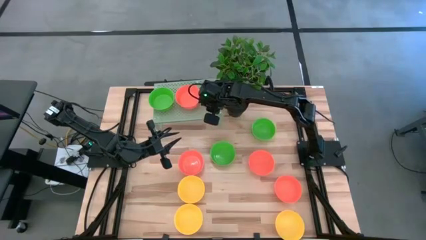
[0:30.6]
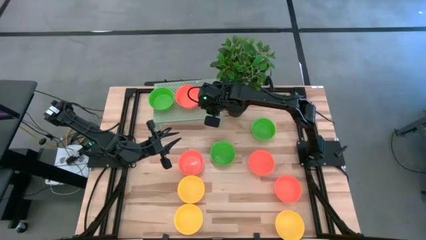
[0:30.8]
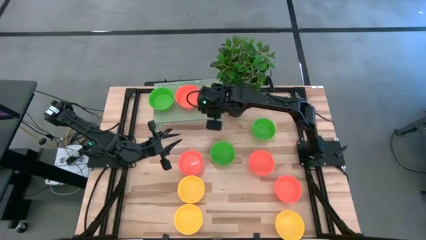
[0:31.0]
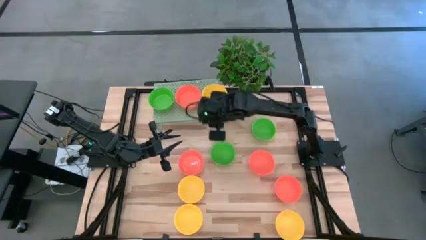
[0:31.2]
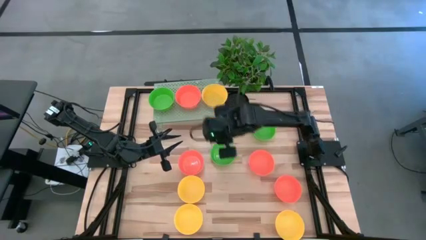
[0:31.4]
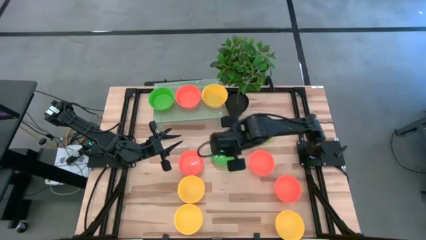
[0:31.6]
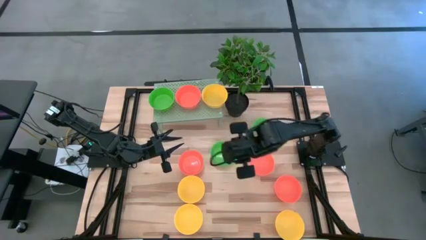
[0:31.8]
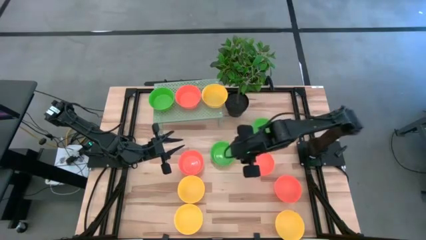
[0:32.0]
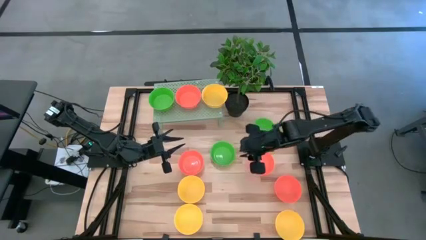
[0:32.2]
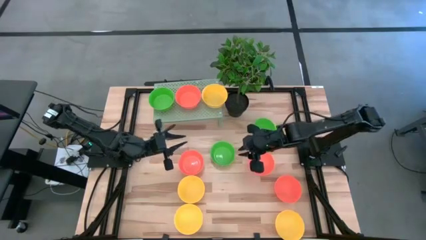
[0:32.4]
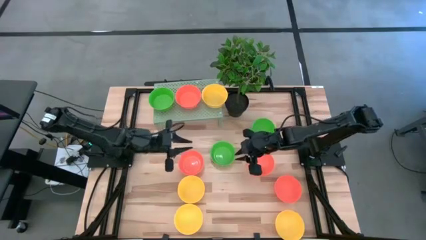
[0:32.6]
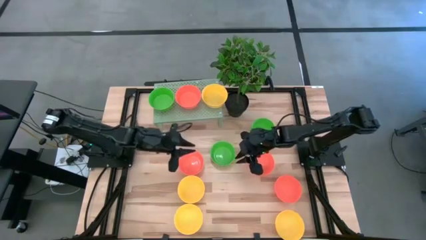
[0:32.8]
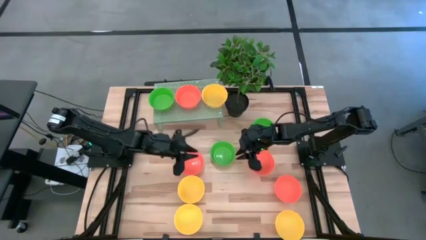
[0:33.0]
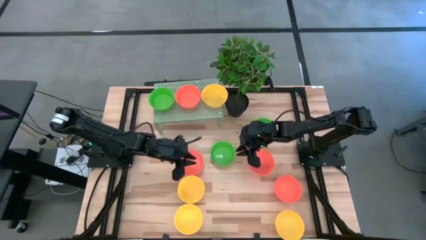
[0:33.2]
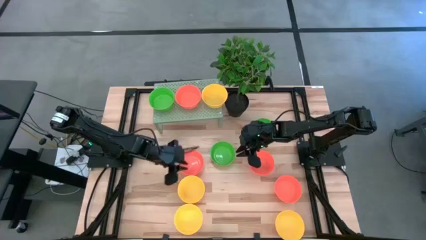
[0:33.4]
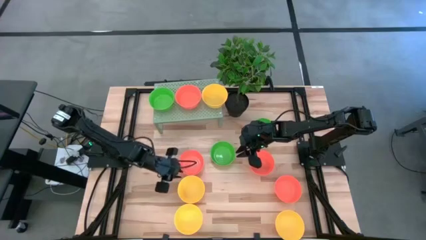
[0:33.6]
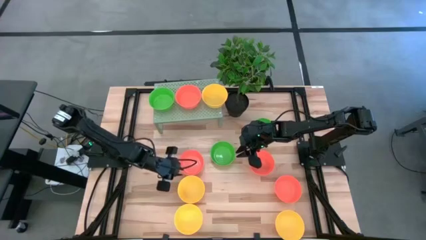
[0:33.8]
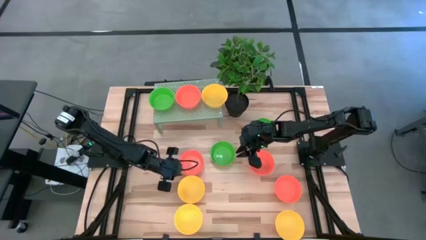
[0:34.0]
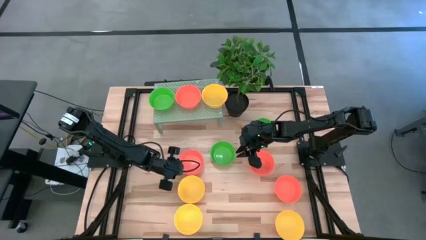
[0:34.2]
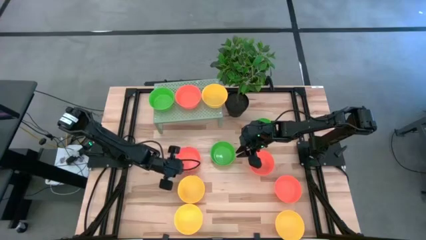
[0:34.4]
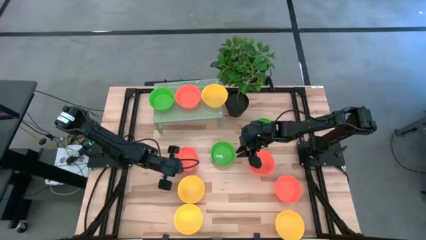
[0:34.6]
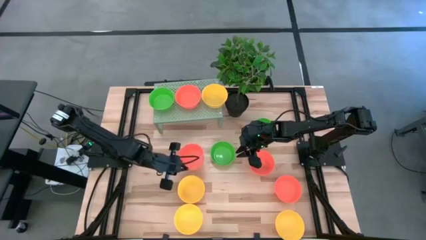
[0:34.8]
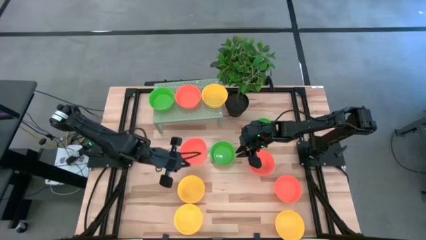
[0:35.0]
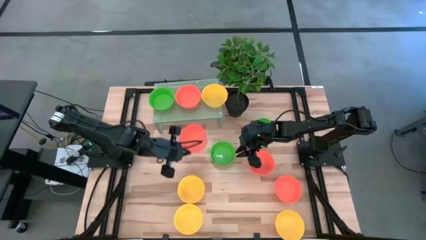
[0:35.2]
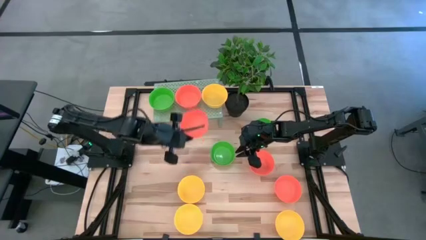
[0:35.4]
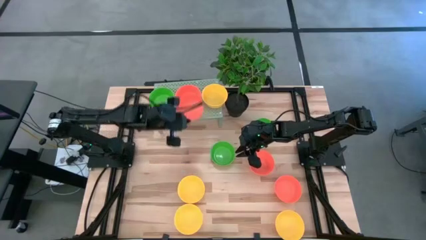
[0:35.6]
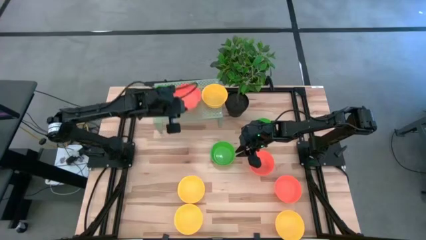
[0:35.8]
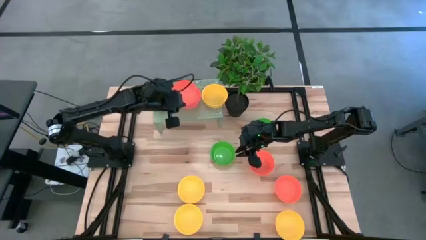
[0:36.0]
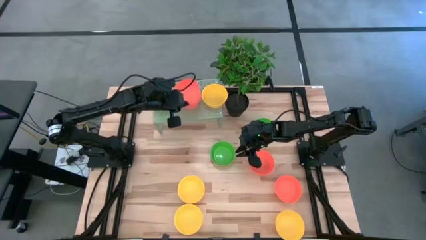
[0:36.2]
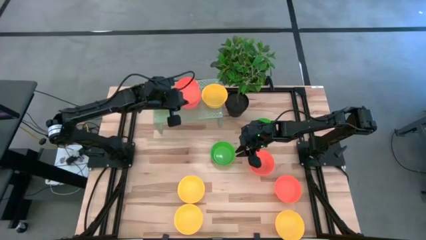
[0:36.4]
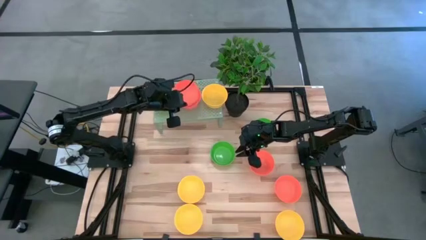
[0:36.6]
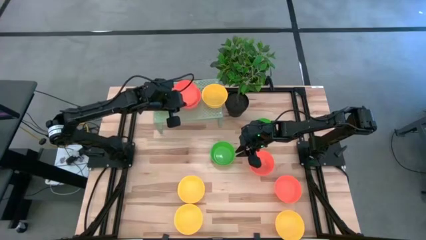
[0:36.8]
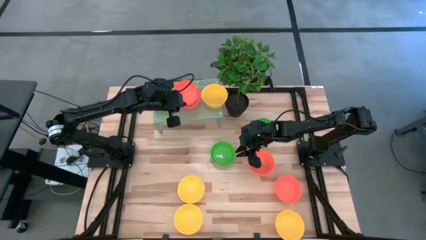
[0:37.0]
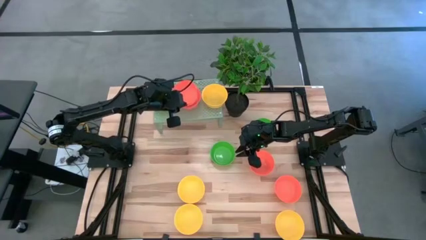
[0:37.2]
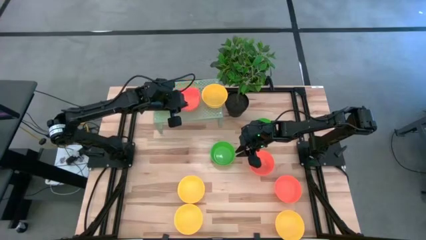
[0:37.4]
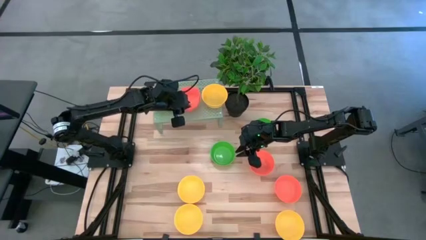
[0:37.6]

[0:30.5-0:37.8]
Task: Pick & Place Mini bowls
Stack the orange bowl on the orange bowl on the shelf

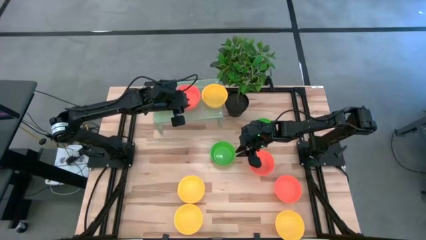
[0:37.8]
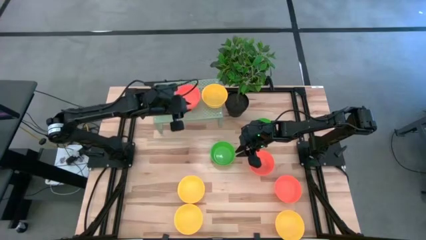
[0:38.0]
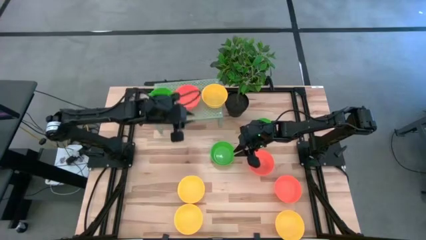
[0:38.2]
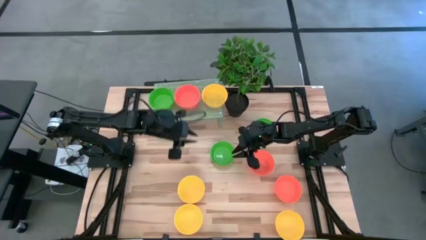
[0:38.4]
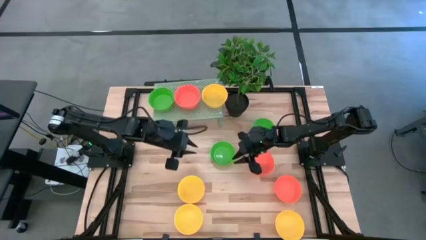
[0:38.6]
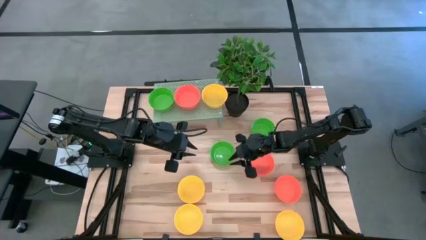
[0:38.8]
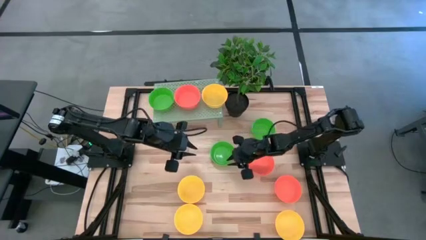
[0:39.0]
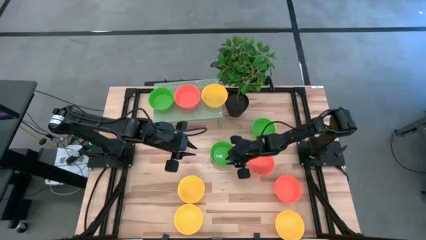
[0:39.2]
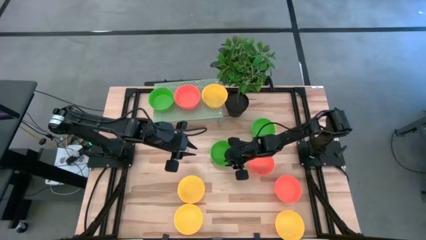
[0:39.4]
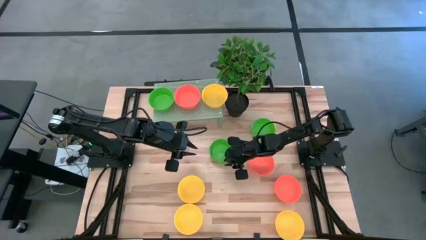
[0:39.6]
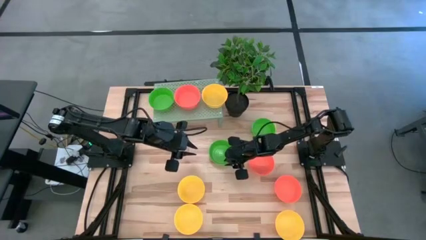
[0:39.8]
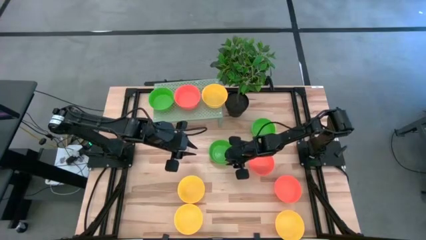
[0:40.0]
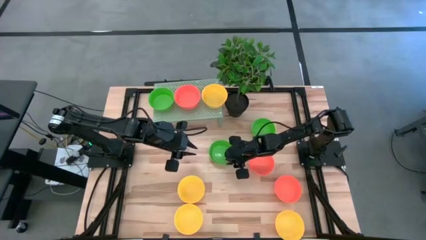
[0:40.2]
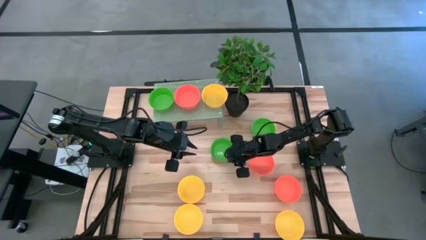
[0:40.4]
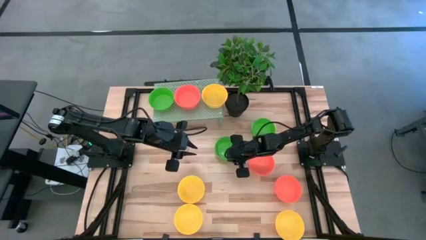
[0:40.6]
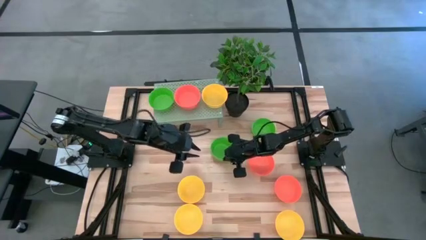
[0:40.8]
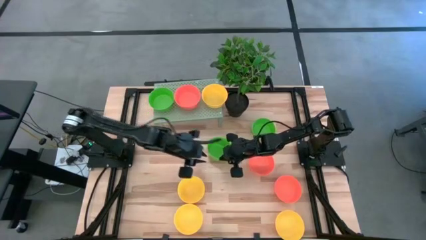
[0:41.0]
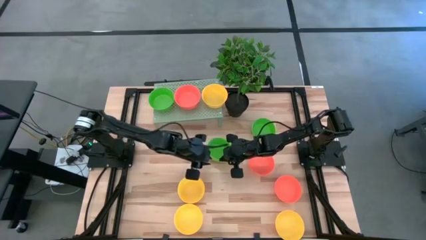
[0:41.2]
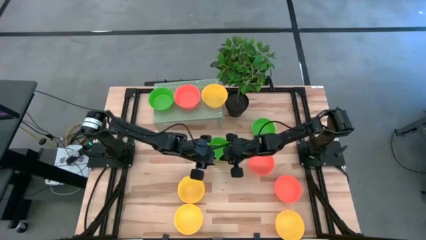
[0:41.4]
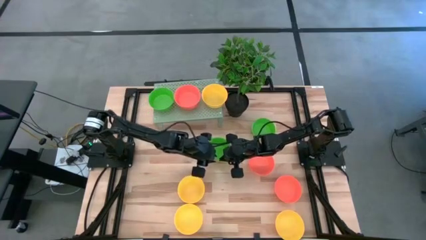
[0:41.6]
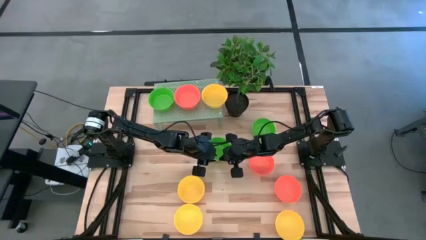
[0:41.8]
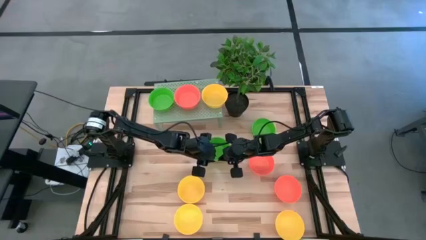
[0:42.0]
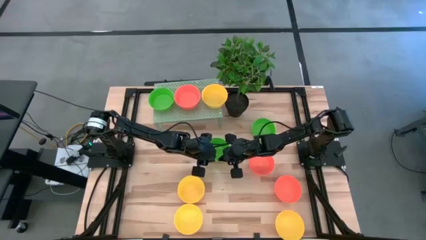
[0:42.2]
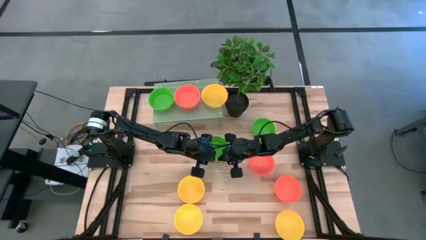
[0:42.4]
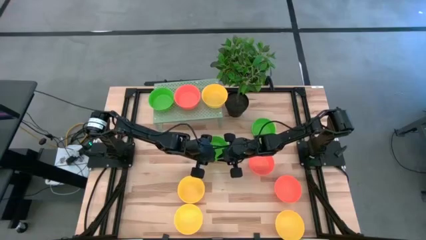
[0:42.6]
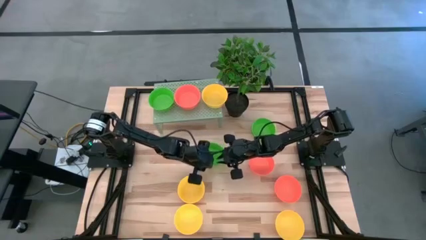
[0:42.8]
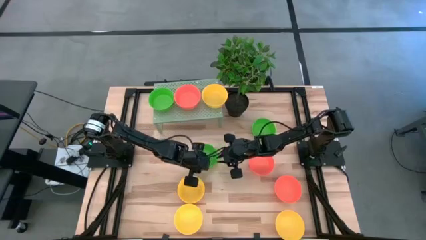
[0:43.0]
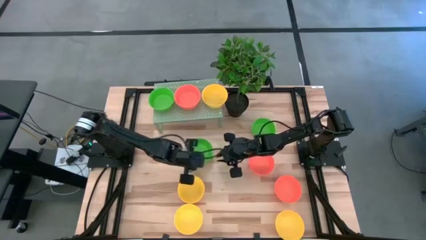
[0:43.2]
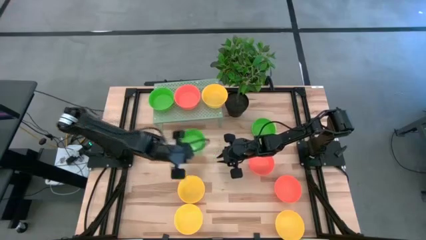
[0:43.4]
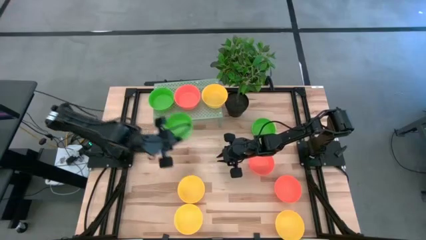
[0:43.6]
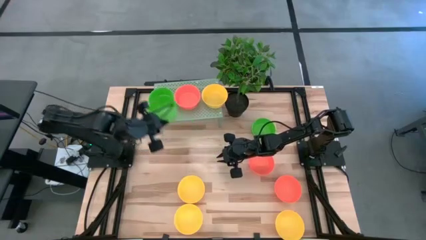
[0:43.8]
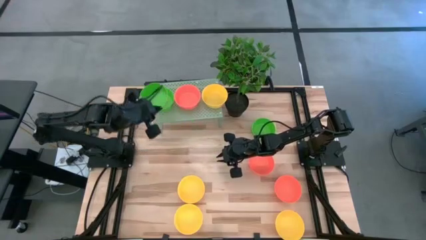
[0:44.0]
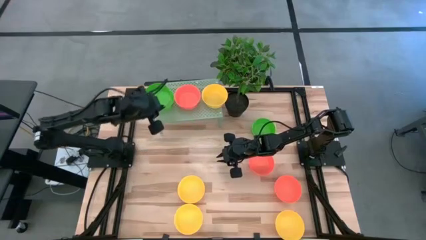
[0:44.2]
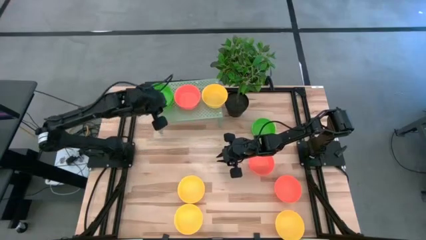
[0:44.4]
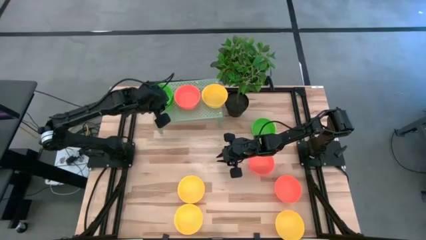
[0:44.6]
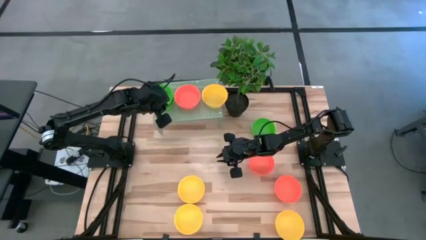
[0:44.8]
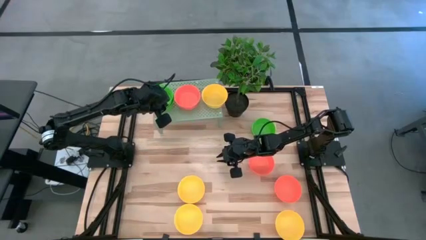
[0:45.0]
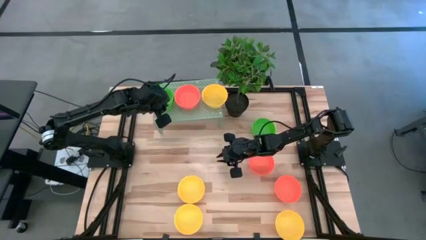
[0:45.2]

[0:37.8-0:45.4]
Stack the green bowl on the green bowl on the shelf

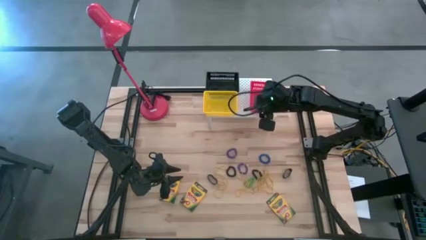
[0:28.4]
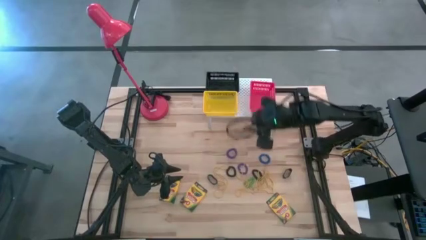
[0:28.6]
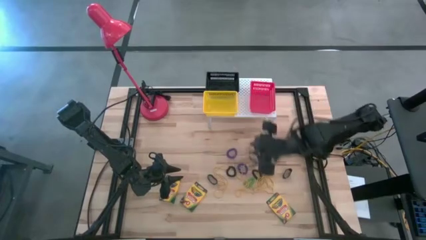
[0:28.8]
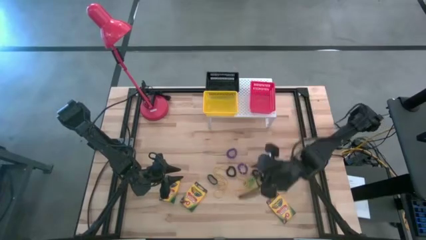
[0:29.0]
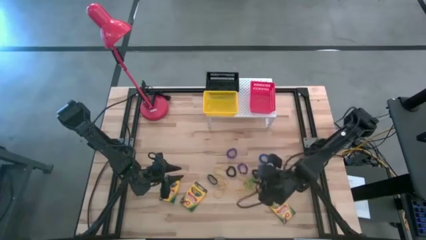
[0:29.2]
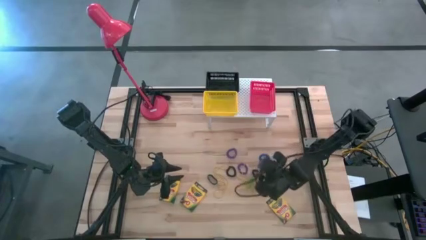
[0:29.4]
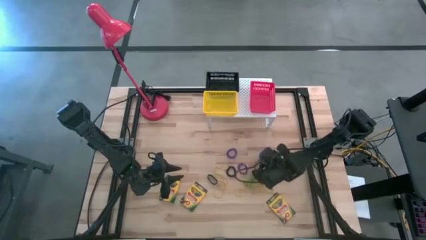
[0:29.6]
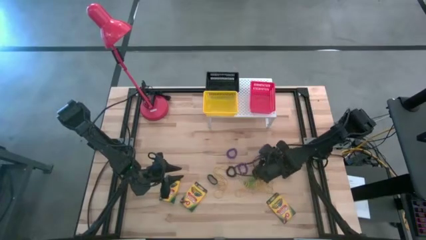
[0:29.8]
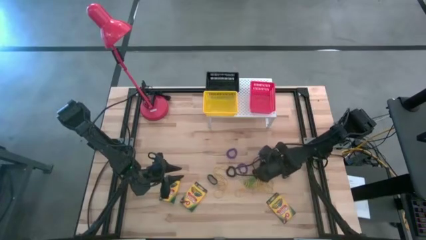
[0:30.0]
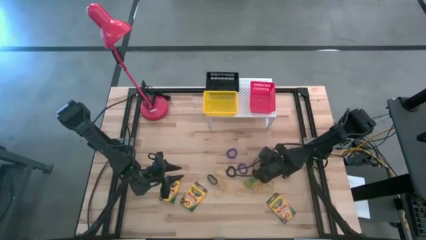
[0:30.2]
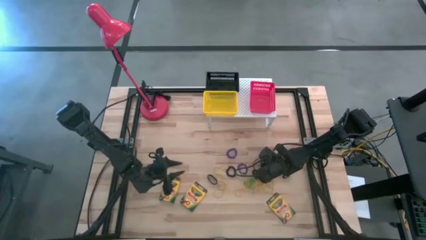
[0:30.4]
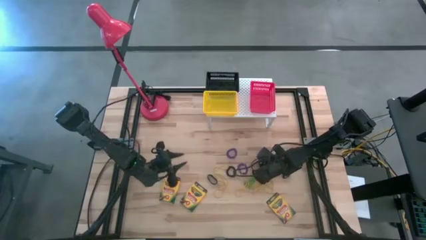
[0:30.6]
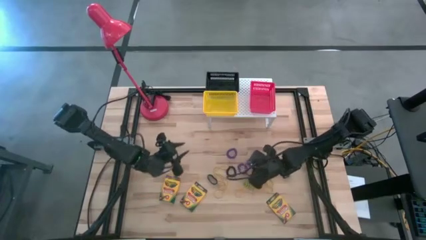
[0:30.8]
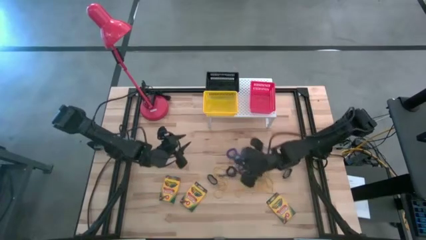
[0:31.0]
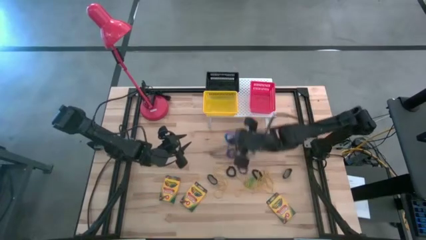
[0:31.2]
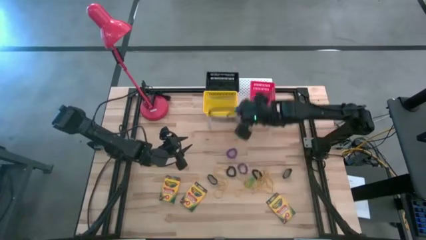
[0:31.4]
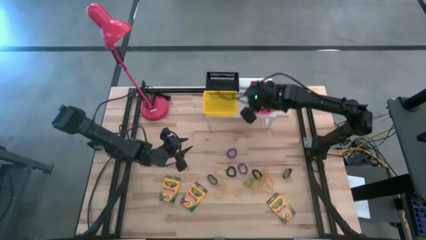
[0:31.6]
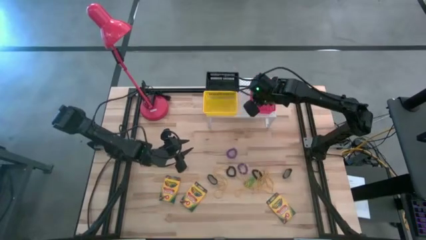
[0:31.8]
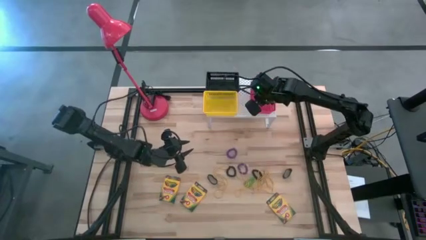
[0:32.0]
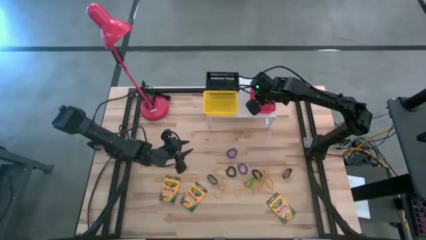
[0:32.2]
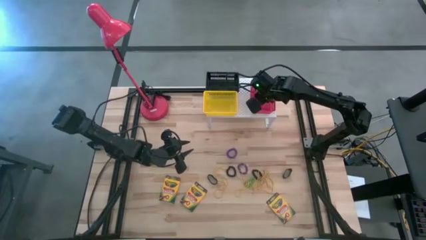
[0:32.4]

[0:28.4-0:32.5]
Task: Pick & Place Office Desk Supplies
Put the blue spring keychain into the red bin on the shelf
